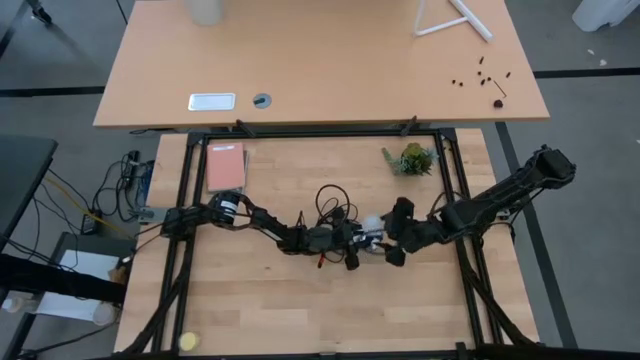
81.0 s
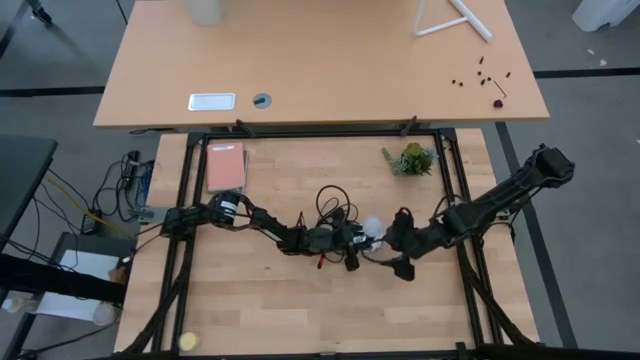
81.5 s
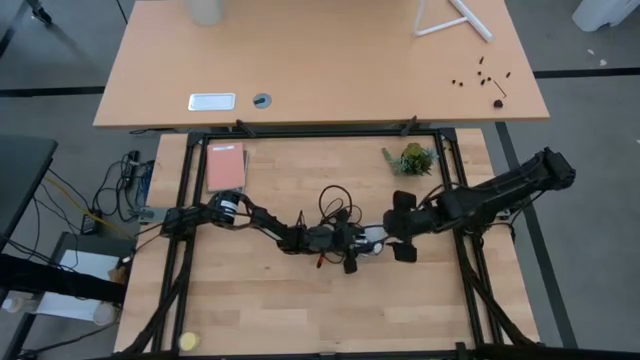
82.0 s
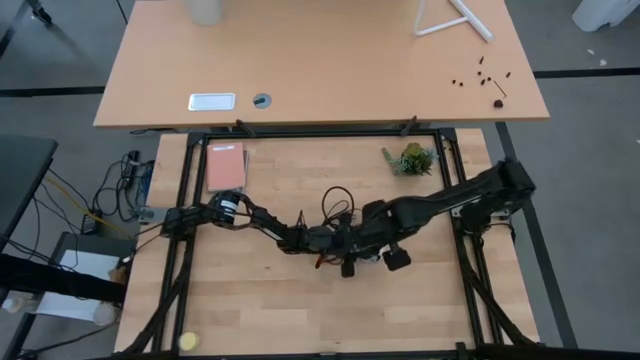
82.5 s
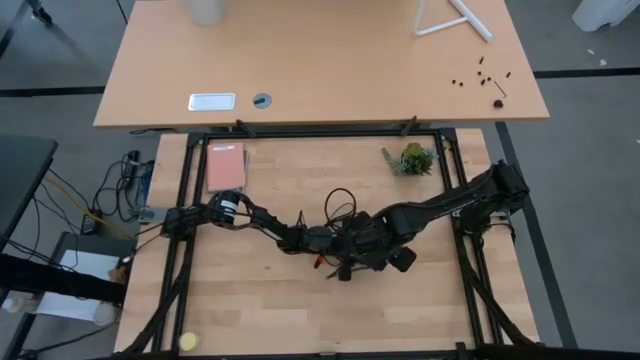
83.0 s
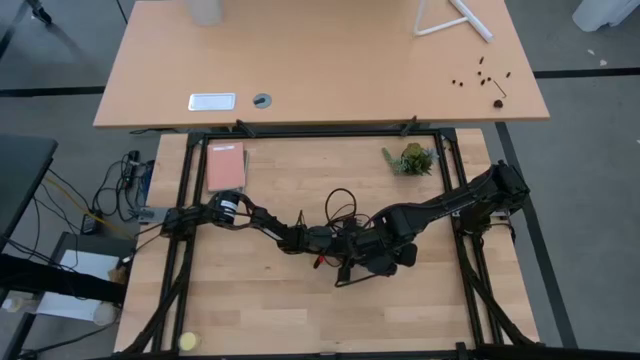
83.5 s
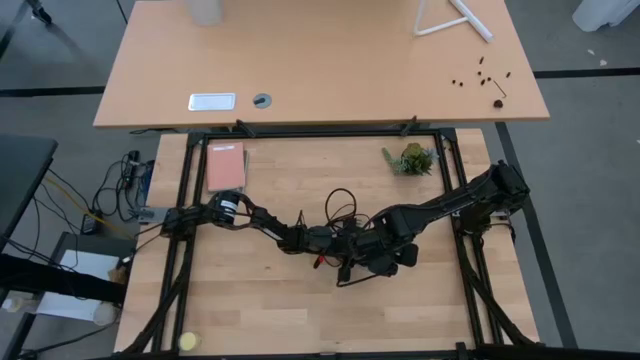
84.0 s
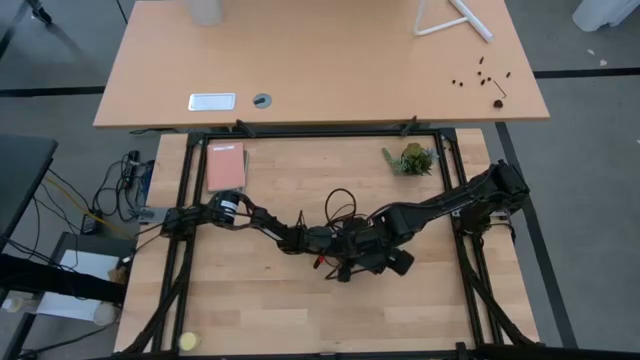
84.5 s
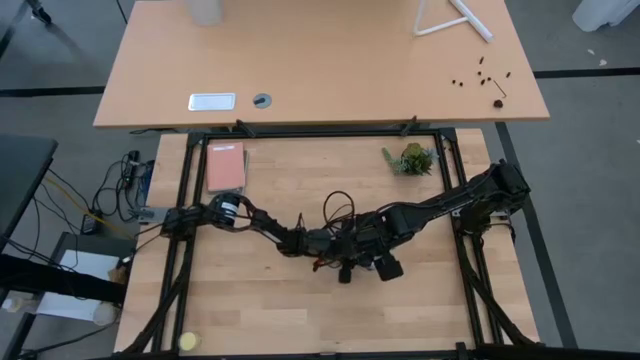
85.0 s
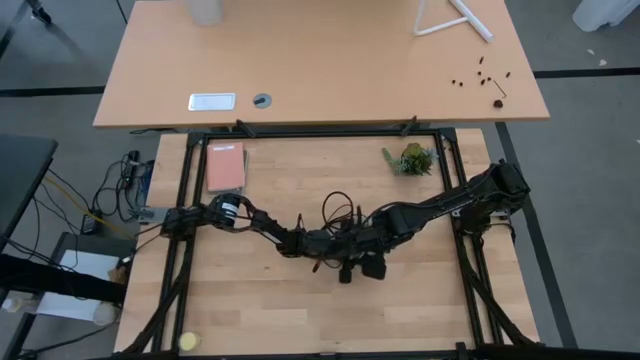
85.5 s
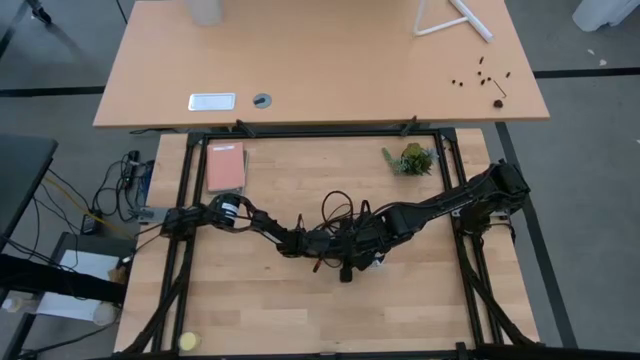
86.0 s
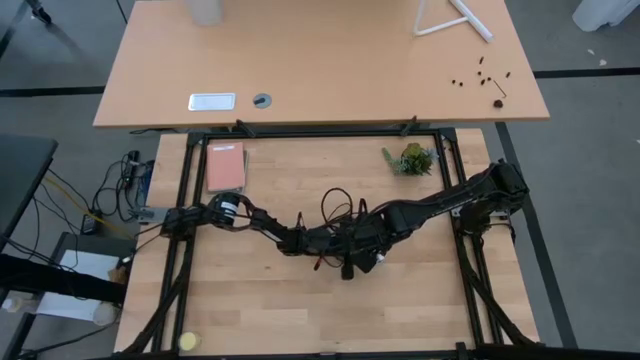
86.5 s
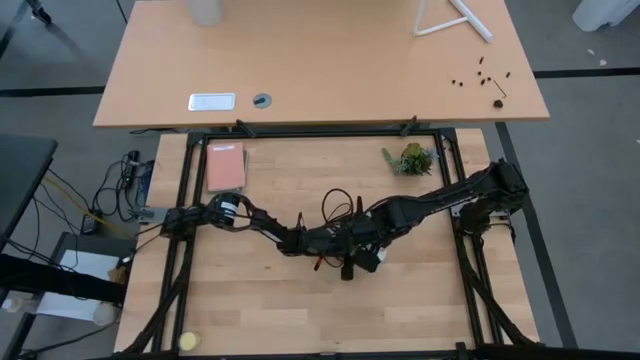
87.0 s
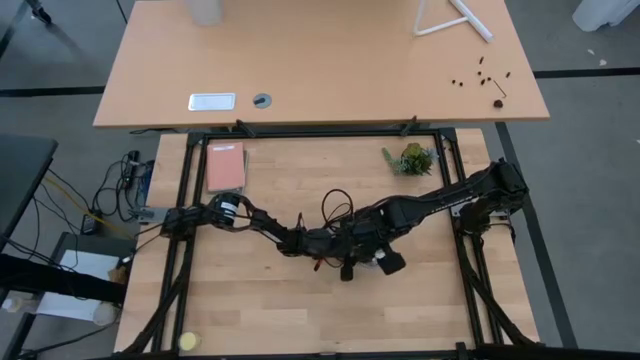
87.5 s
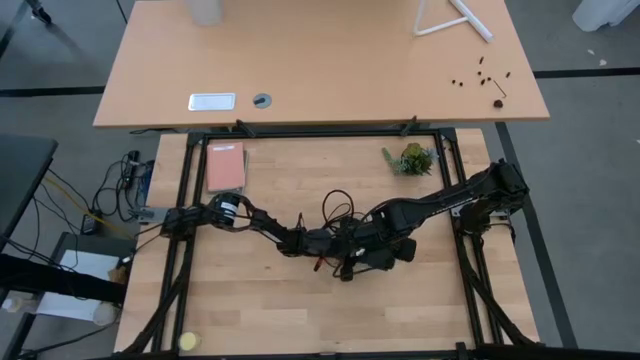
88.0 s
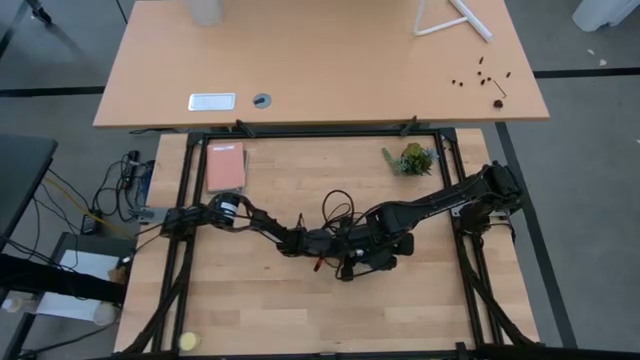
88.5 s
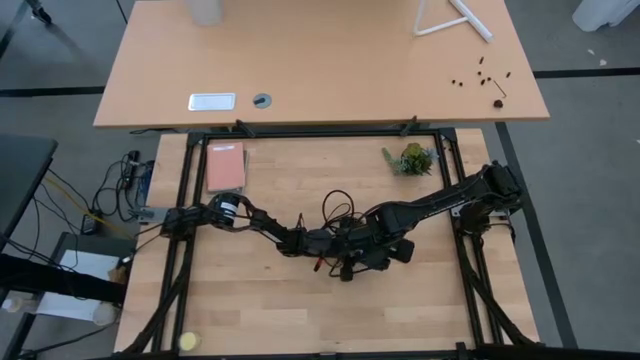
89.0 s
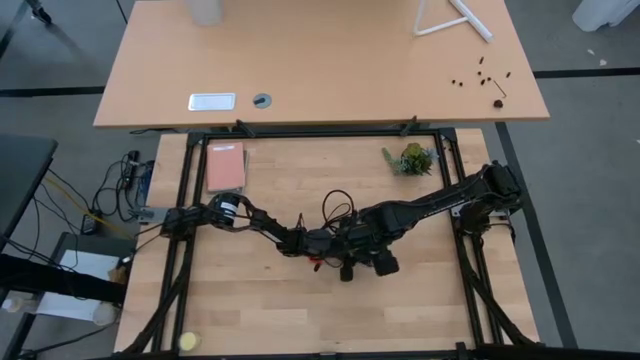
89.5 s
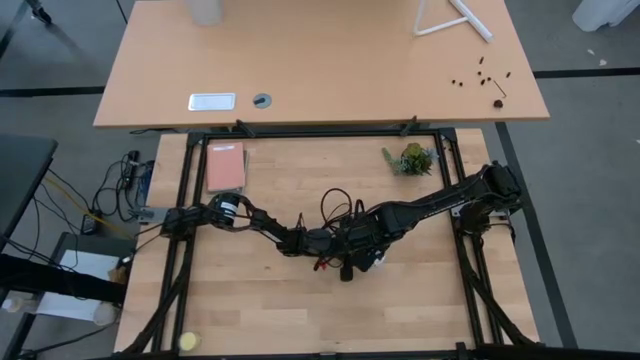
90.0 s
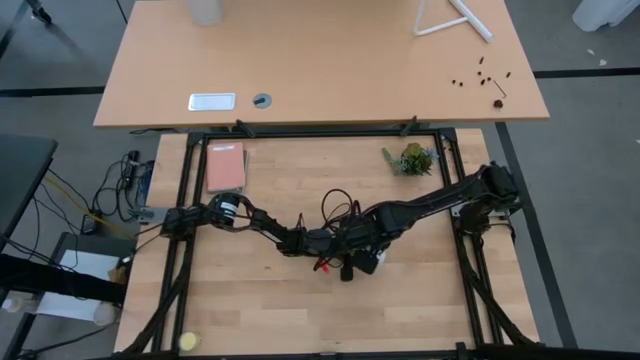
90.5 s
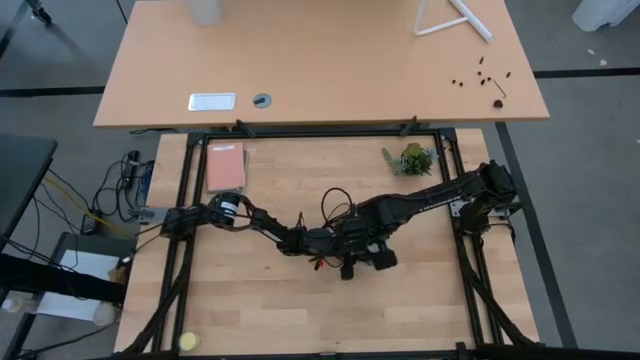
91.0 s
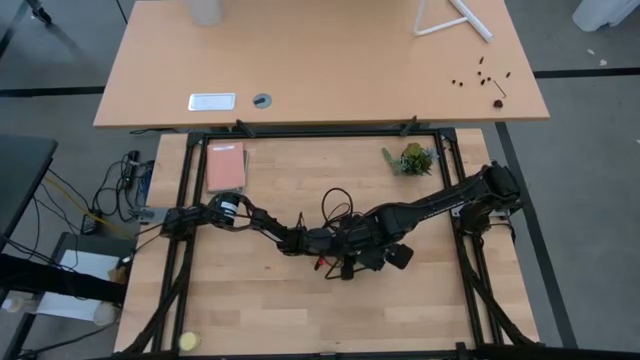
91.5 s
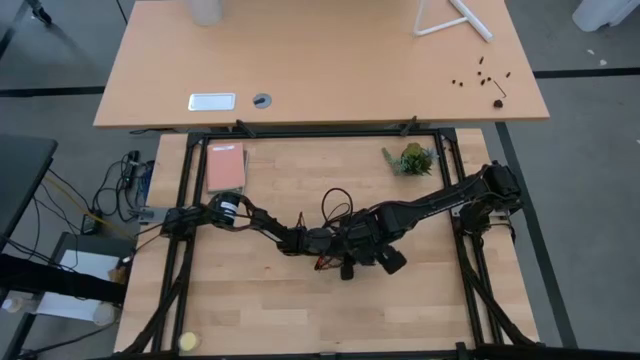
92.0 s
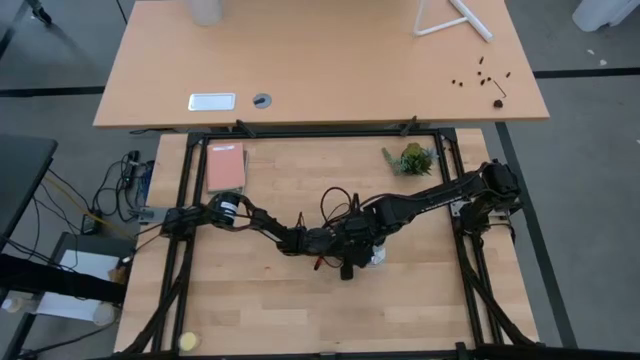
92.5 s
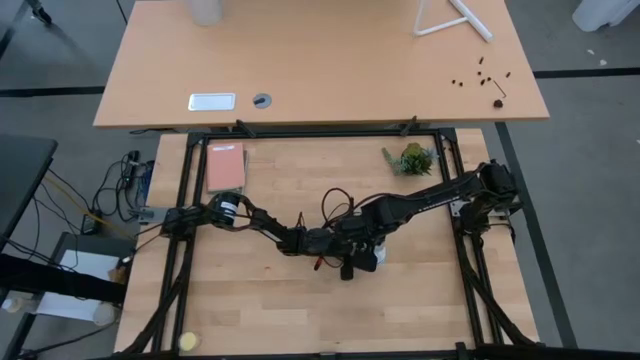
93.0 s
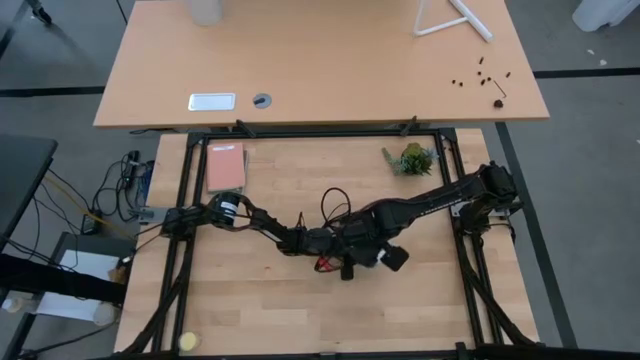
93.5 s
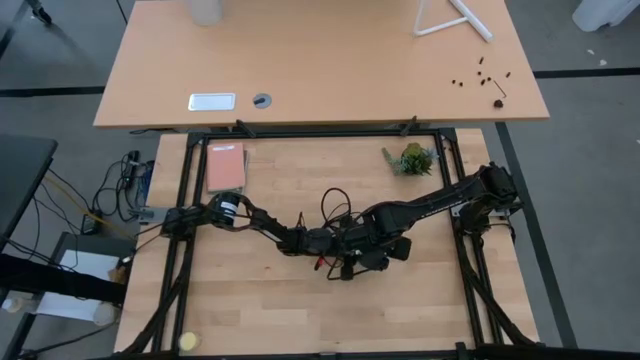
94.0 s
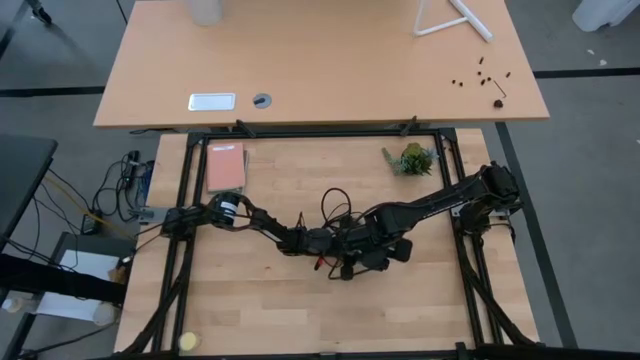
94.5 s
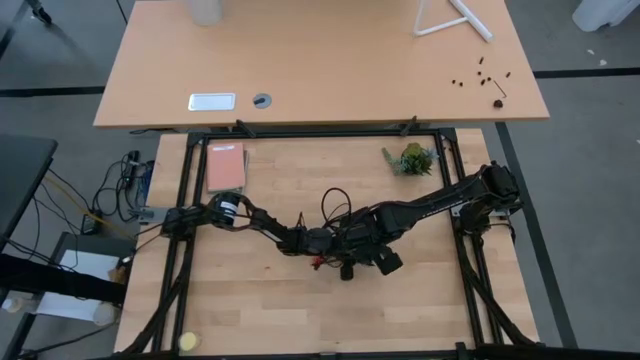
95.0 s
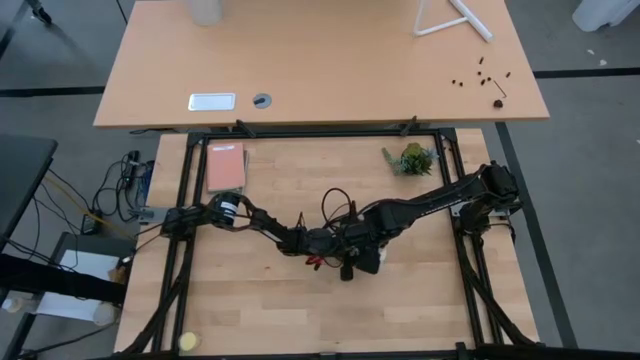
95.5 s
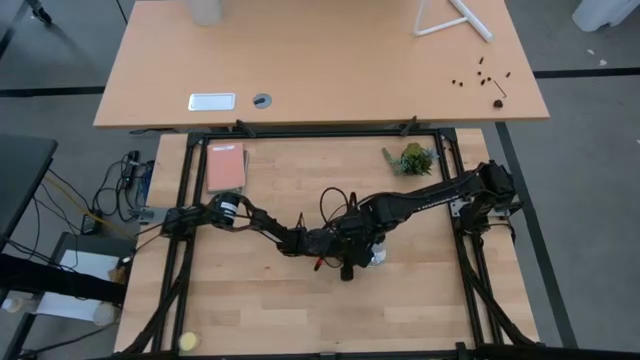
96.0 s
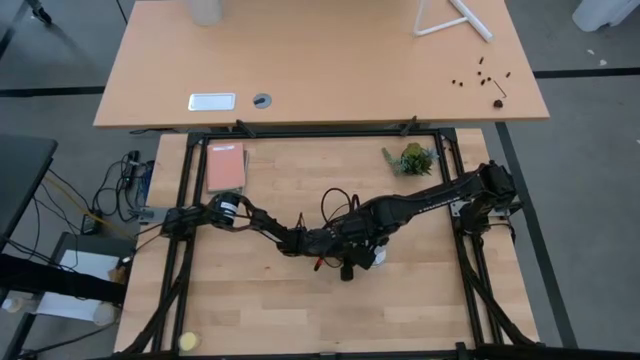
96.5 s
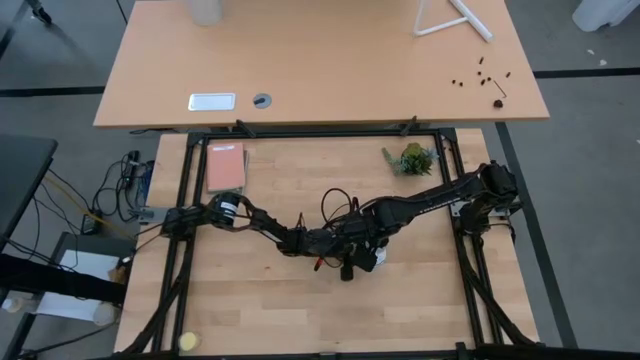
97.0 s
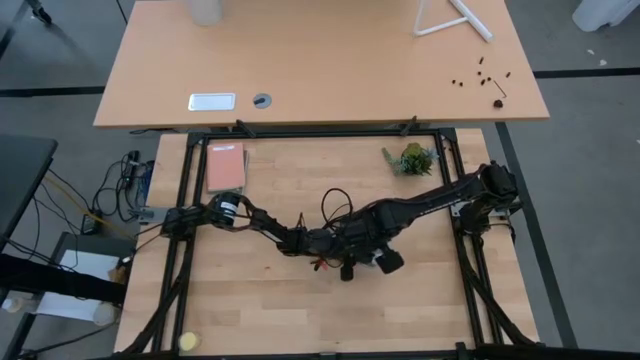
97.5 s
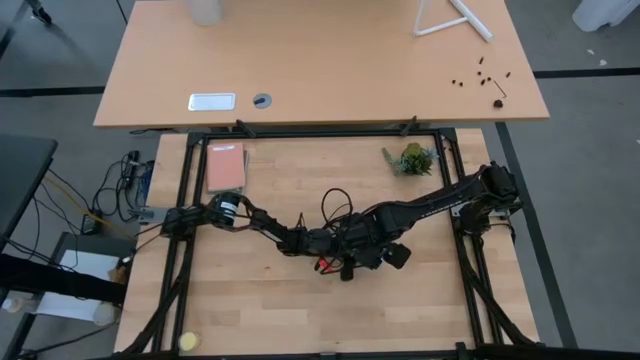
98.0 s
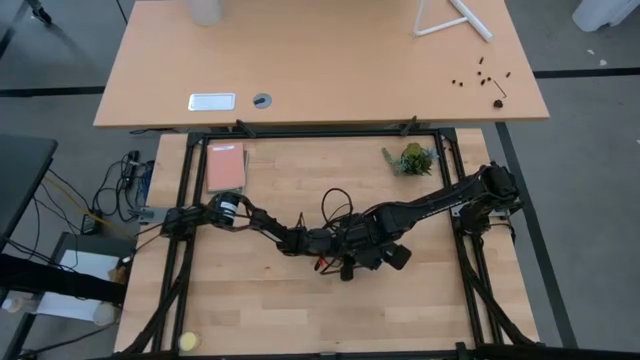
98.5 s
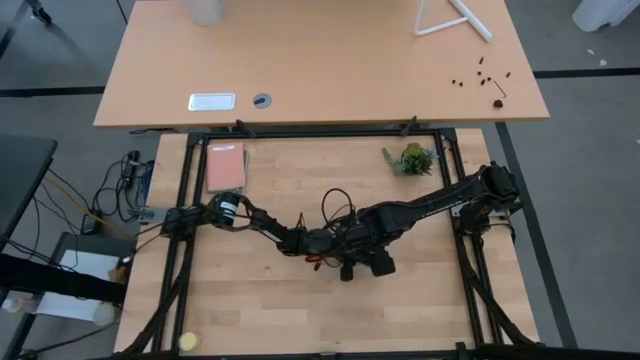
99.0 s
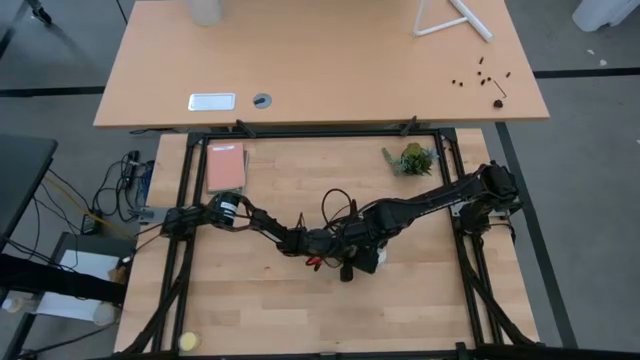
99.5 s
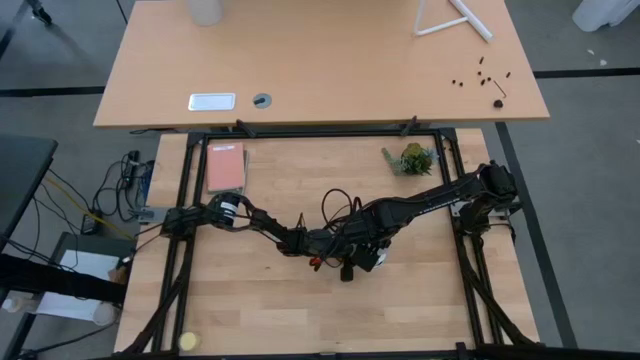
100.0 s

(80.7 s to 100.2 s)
Task: Screw lightbulb
Insert the lightbulb into the lamp
